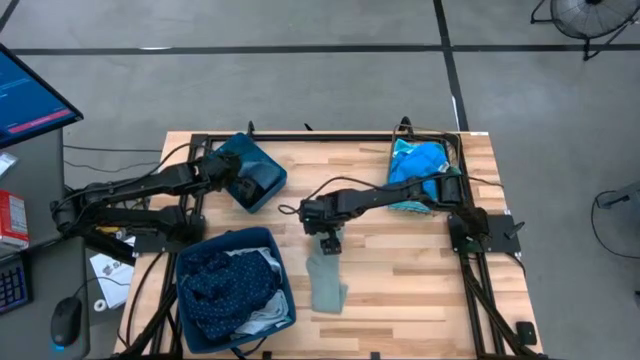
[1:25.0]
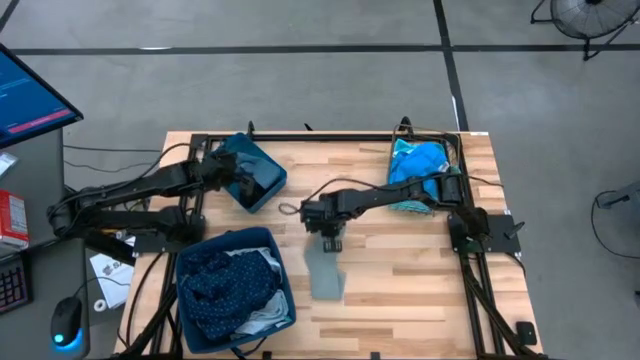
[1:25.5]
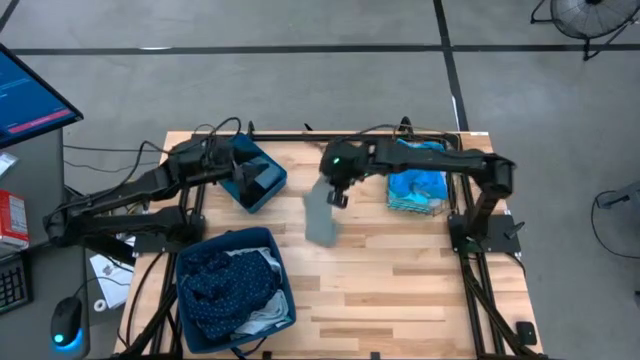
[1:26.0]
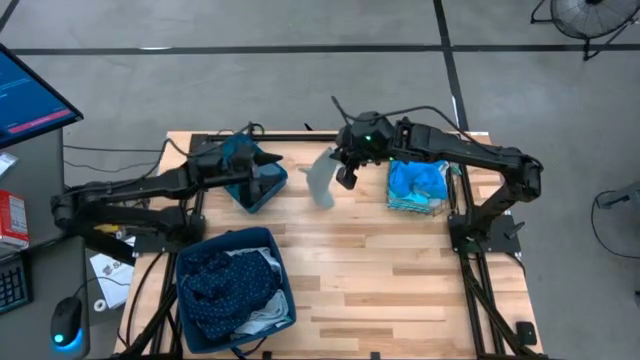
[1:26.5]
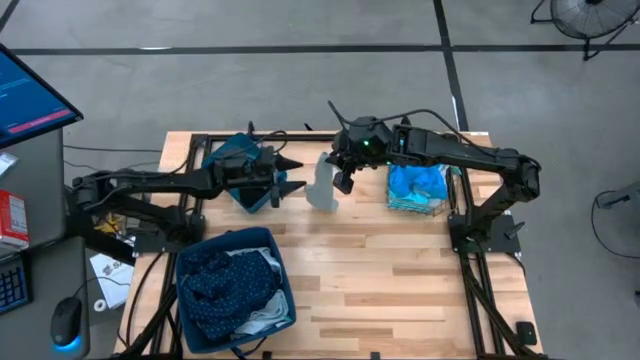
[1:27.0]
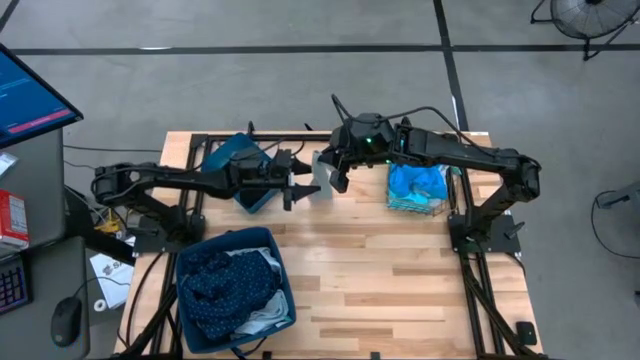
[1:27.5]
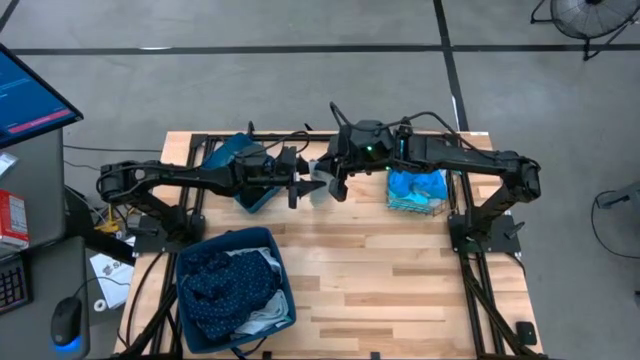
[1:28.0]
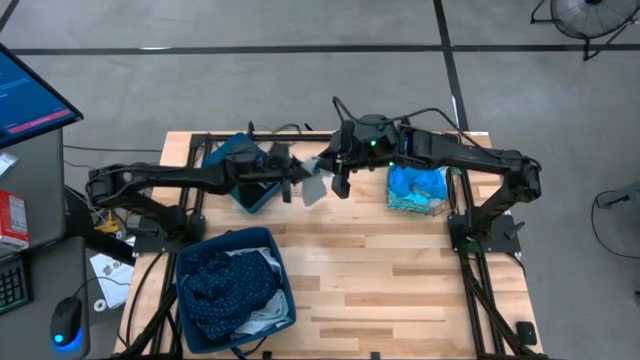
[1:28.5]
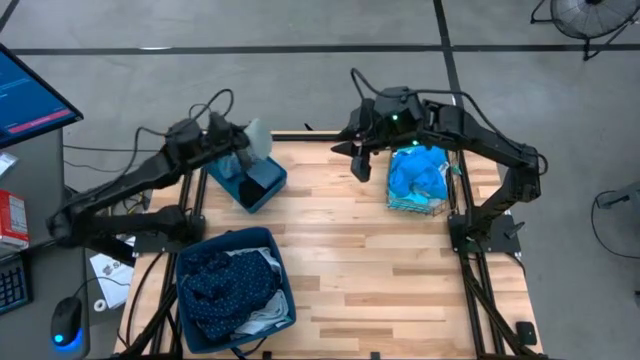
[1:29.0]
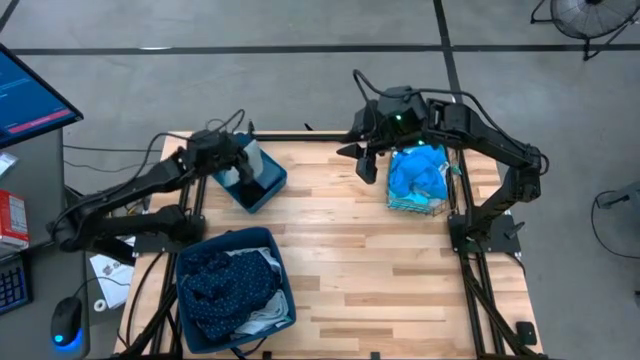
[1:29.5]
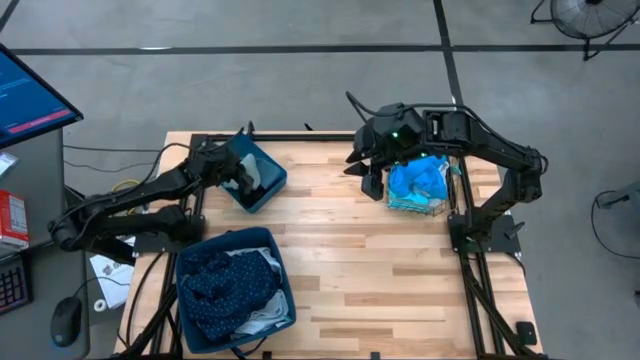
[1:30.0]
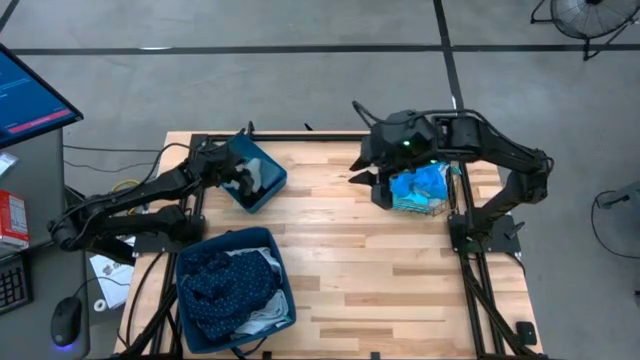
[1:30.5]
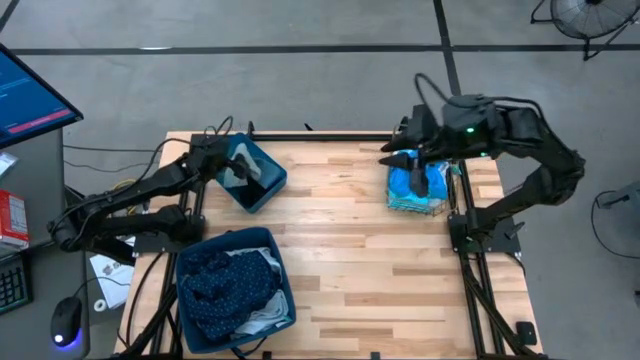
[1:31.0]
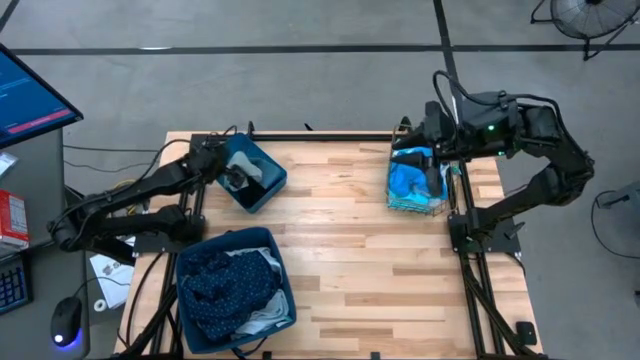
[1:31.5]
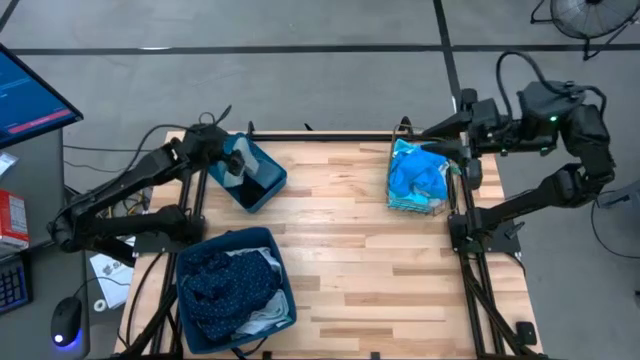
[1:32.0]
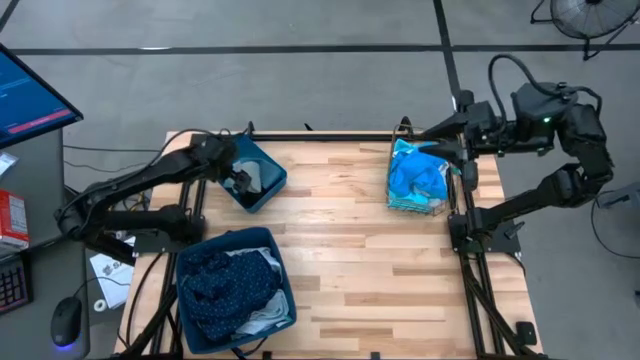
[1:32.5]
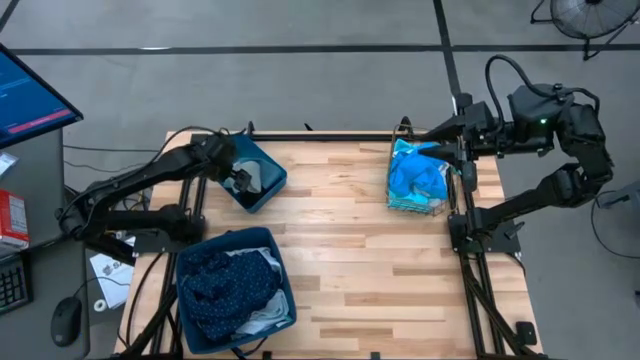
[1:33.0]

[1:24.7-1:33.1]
Task: Pick & Place Cloths
Put the gray sock into the small blue bin

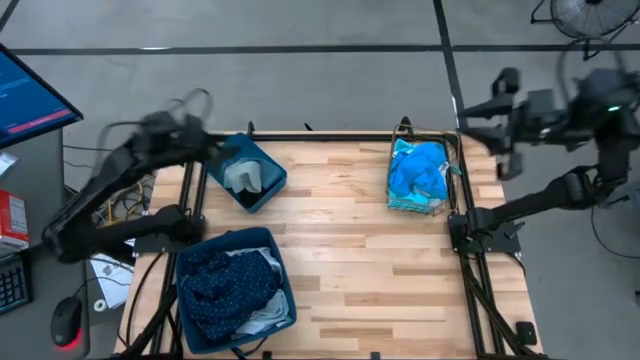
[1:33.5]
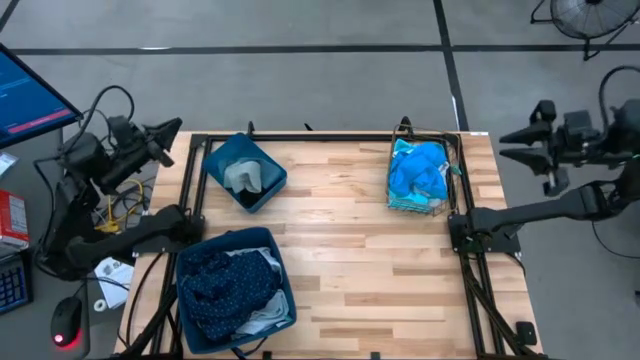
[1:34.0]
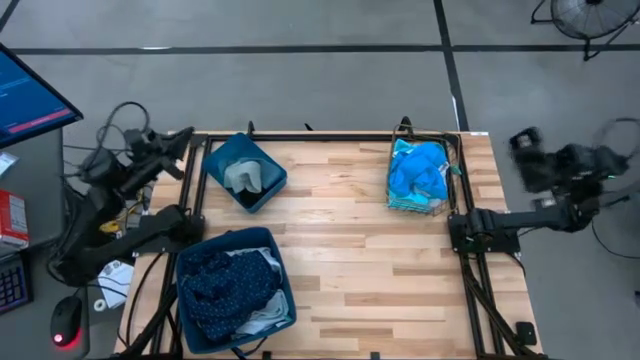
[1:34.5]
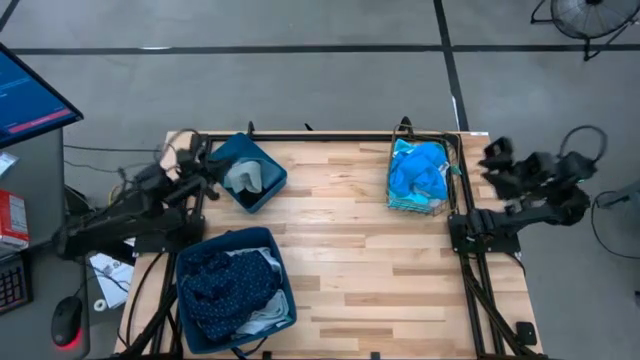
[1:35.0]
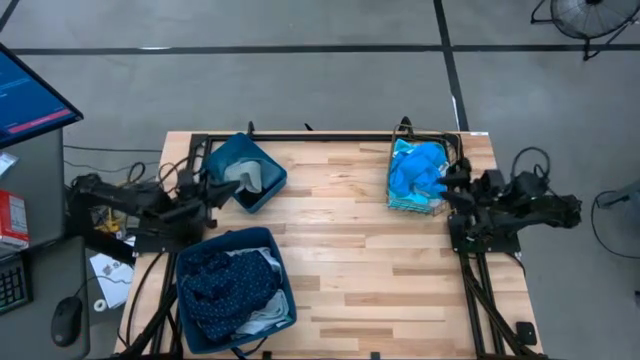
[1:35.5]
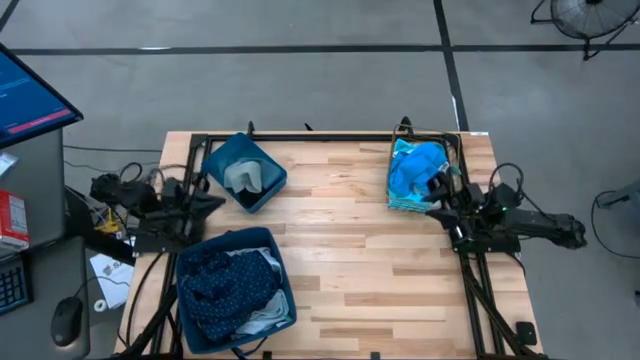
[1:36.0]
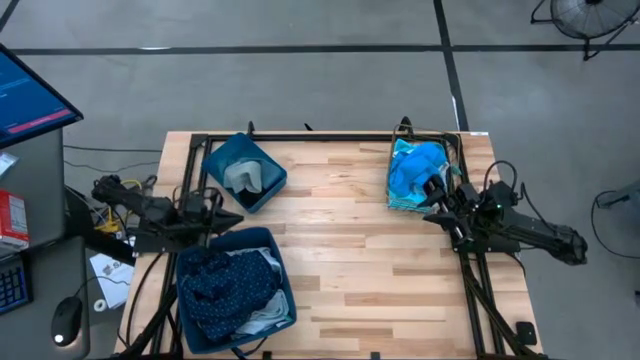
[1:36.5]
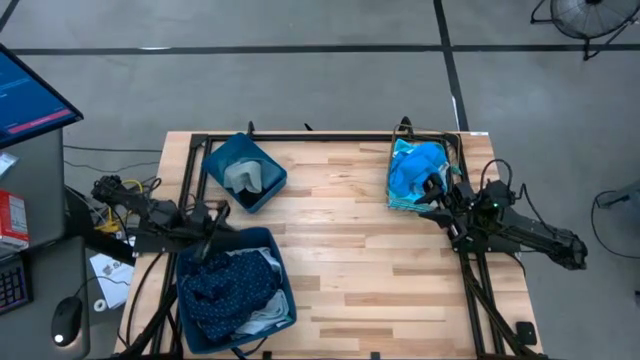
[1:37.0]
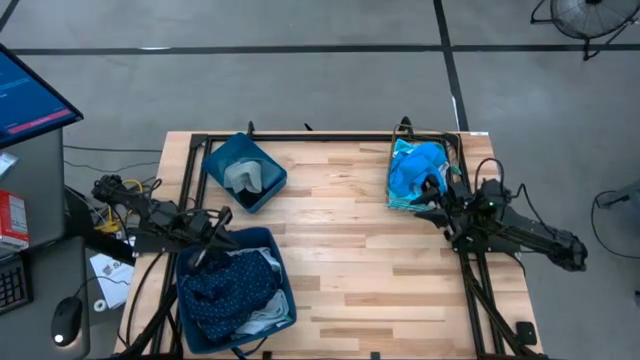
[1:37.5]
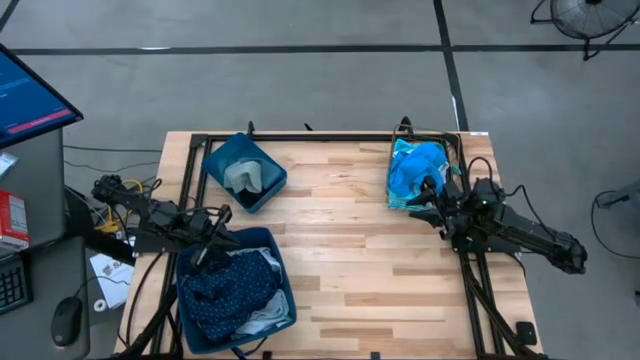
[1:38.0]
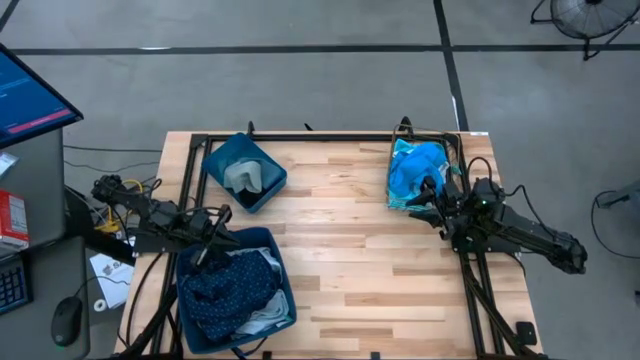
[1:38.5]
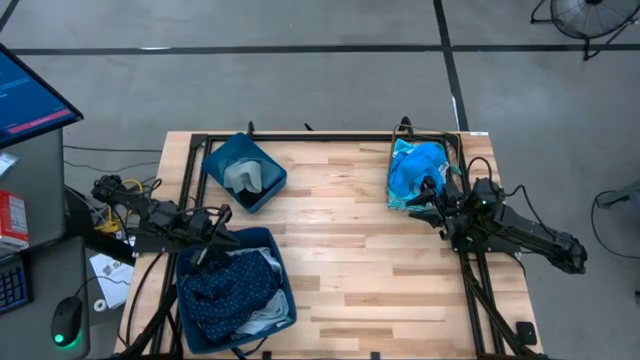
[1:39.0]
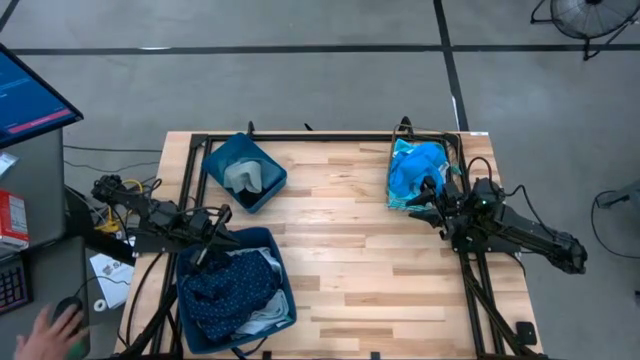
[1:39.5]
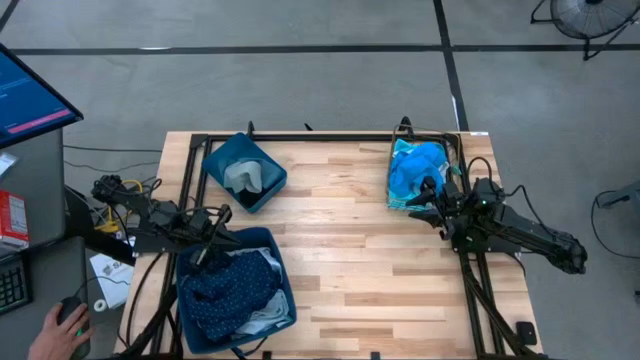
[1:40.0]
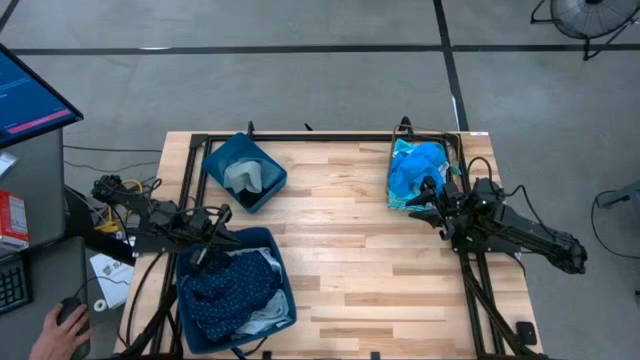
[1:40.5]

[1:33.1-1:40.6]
Return To Home Position

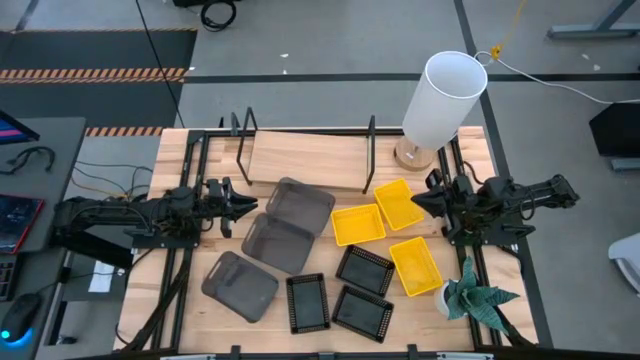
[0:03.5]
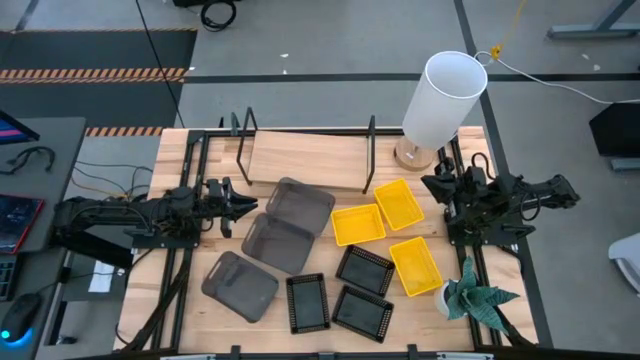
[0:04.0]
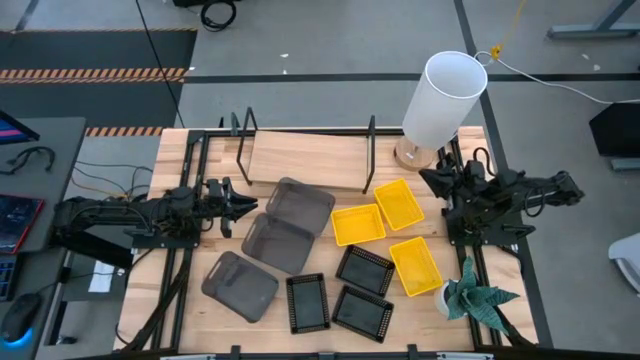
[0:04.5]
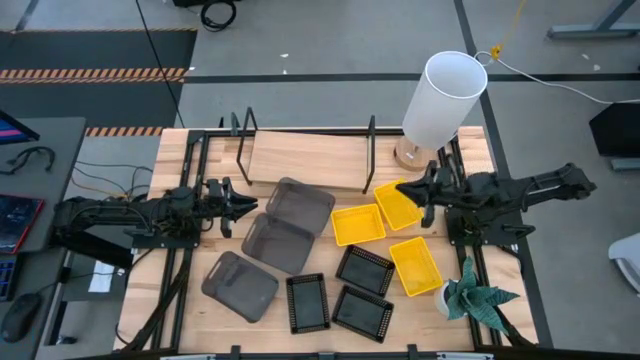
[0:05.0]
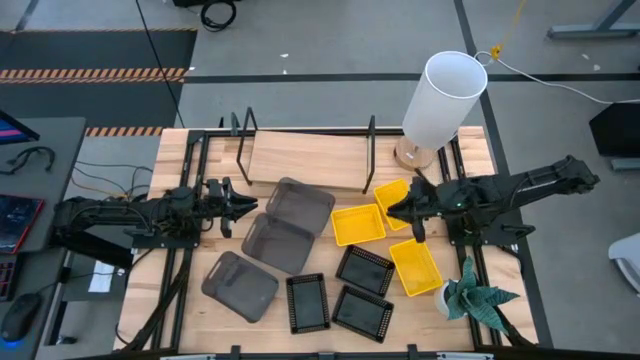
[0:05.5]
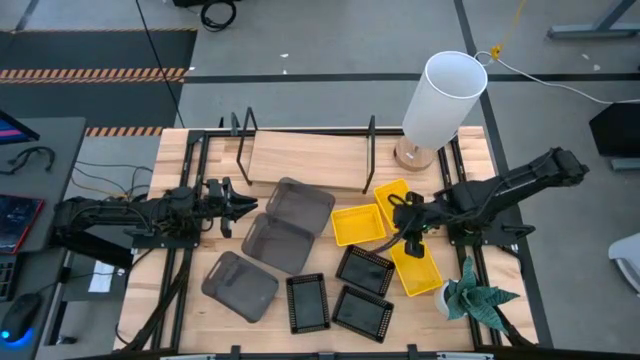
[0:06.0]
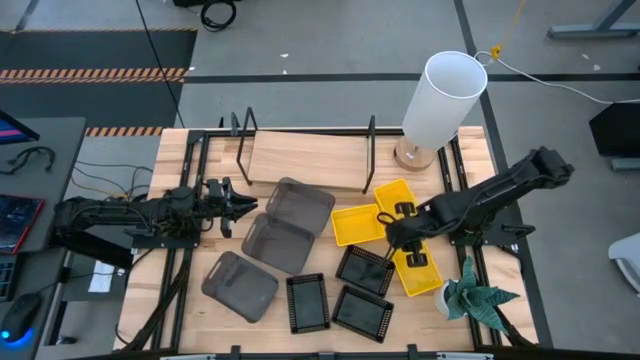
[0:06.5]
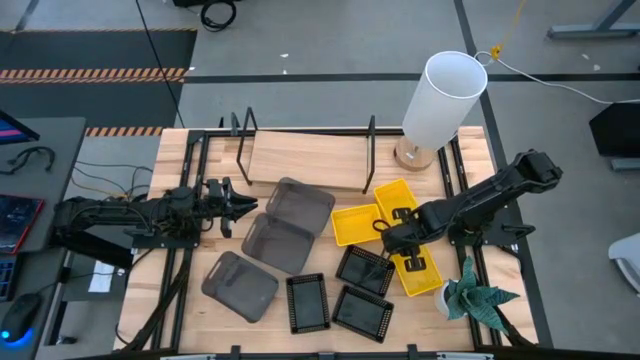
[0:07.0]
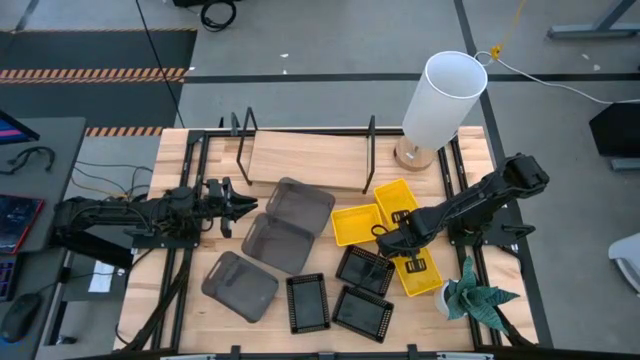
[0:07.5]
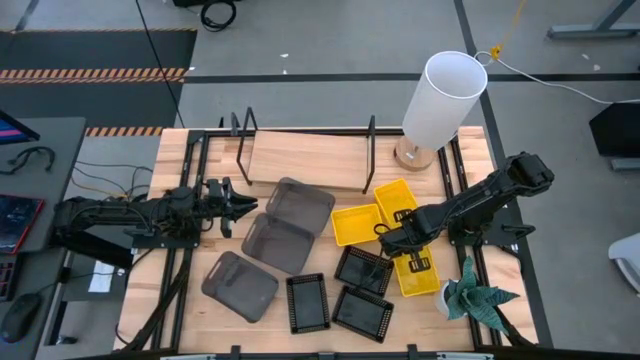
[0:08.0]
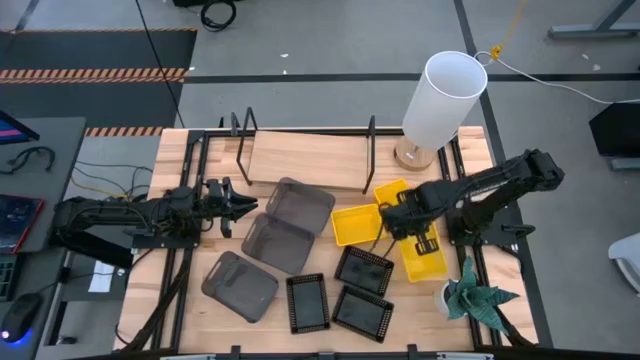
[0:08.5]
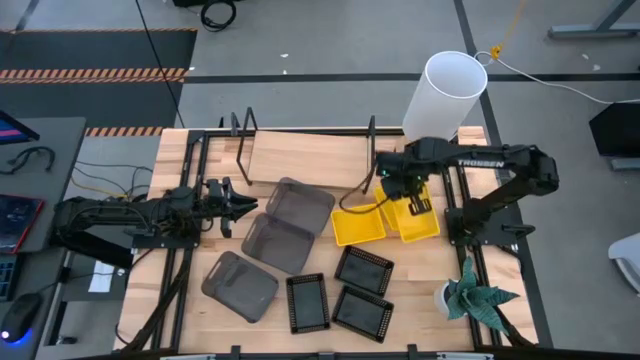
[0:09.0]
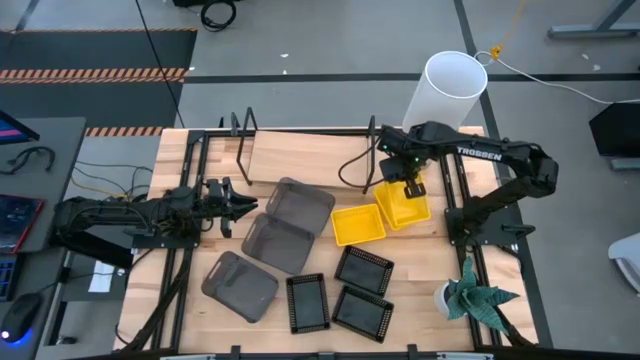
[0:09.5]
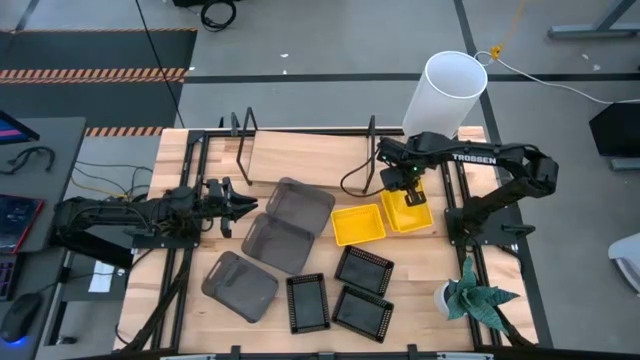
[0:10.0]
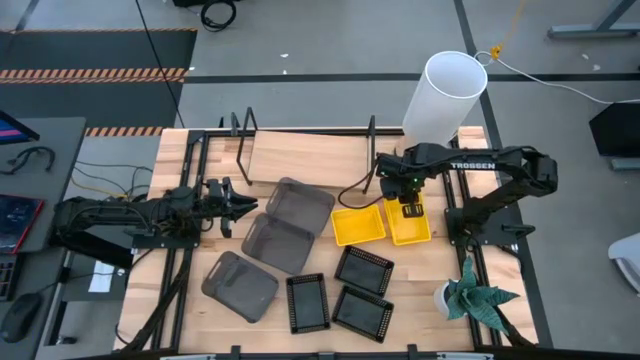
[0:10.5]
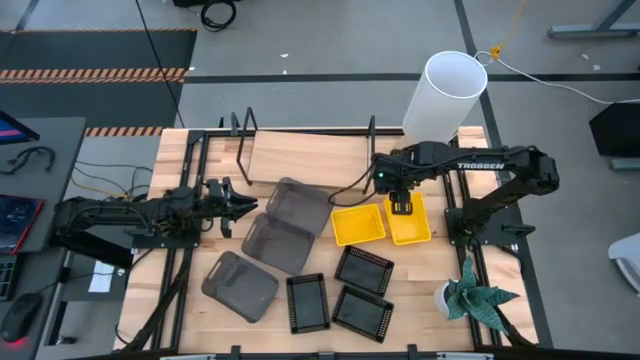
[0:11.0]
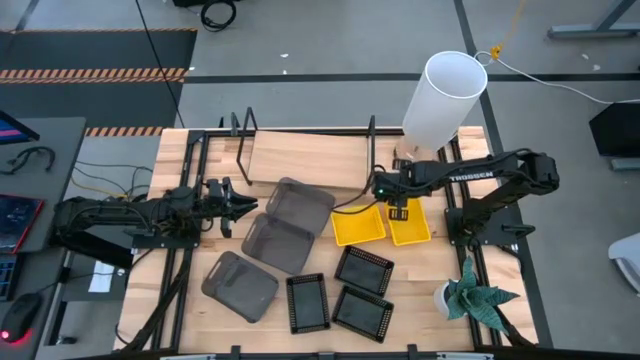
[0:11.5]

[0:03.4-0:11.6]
Task: Stack baskets on shelf by color
Stack the bottom yellow basket on the top right yellow basket
